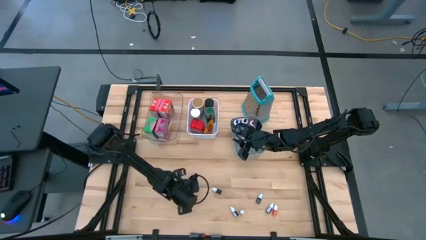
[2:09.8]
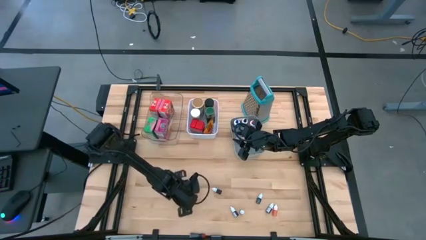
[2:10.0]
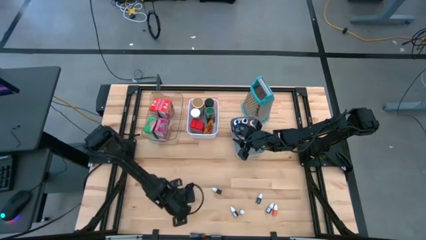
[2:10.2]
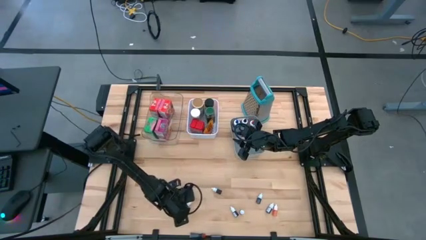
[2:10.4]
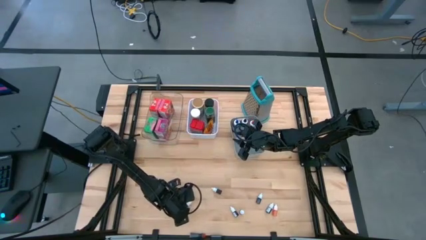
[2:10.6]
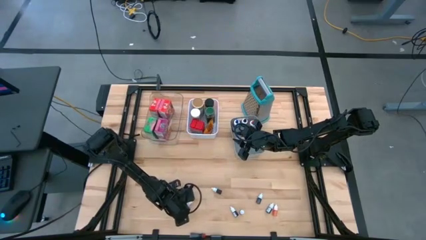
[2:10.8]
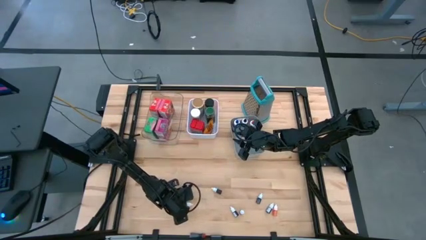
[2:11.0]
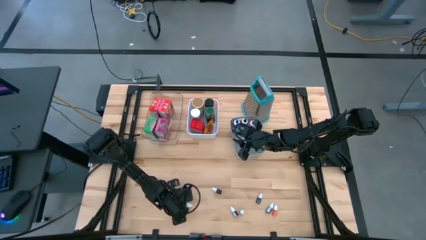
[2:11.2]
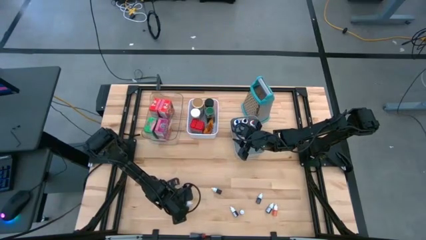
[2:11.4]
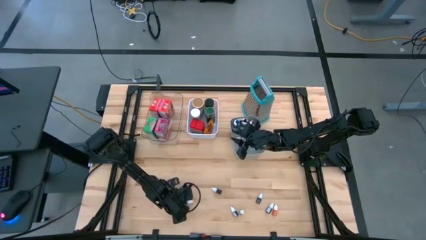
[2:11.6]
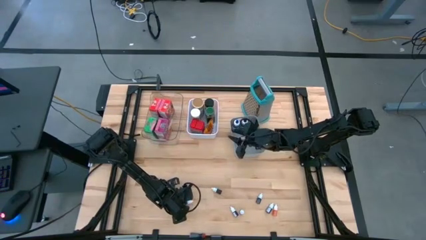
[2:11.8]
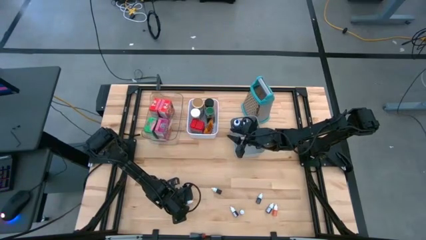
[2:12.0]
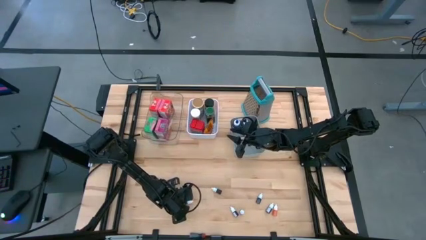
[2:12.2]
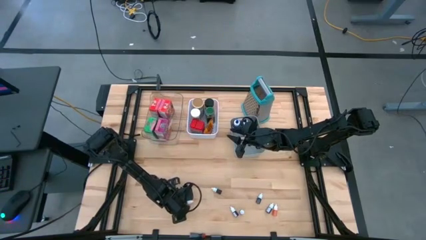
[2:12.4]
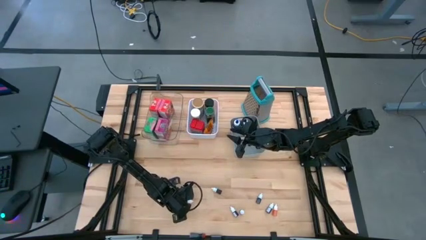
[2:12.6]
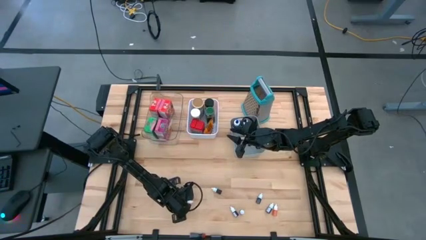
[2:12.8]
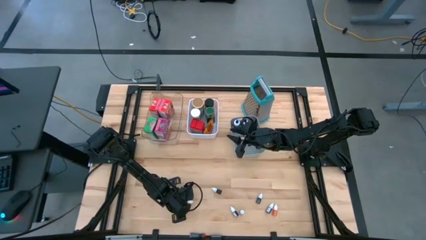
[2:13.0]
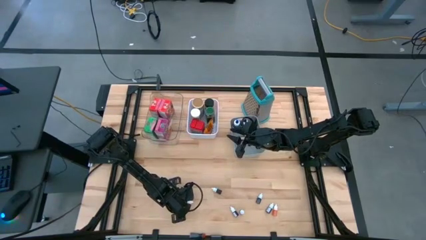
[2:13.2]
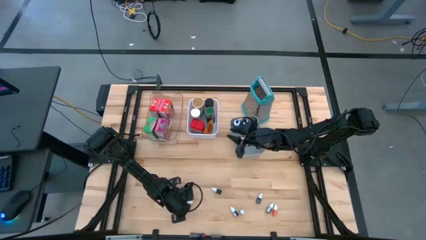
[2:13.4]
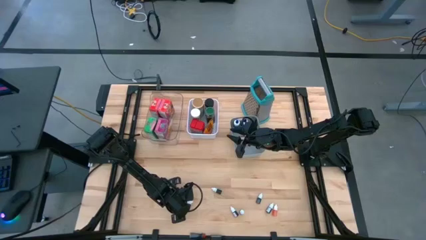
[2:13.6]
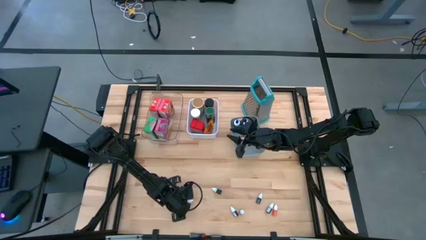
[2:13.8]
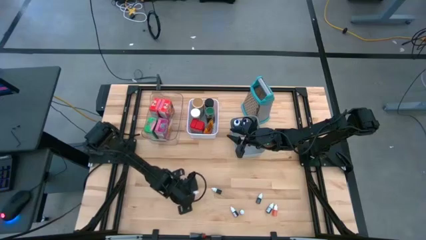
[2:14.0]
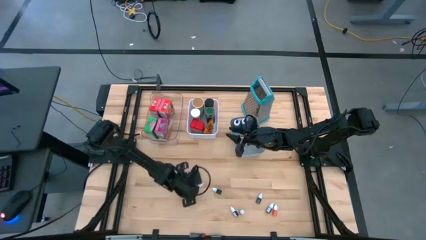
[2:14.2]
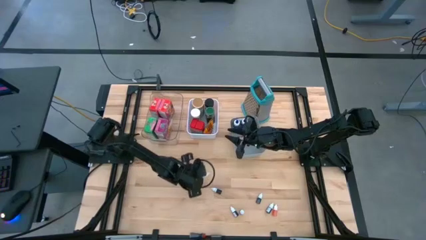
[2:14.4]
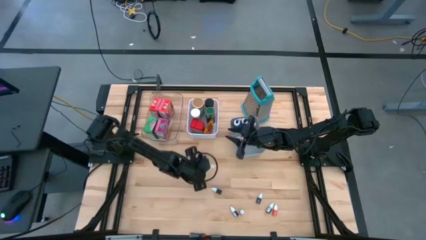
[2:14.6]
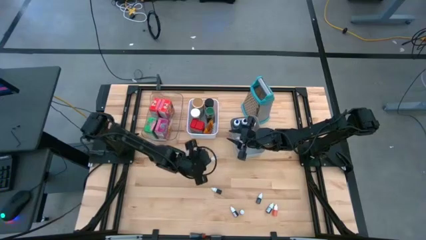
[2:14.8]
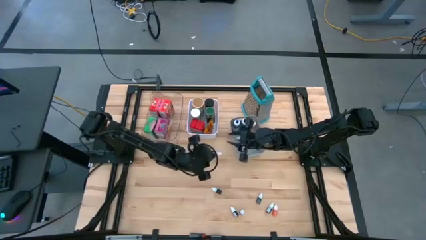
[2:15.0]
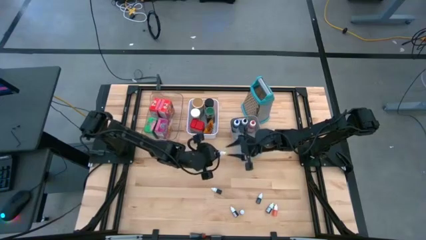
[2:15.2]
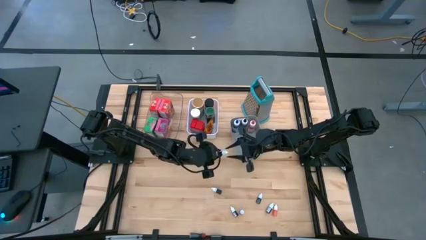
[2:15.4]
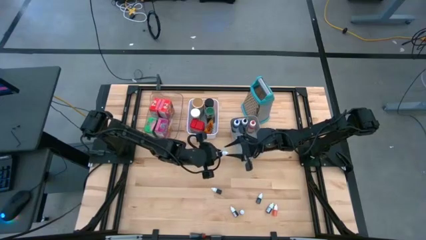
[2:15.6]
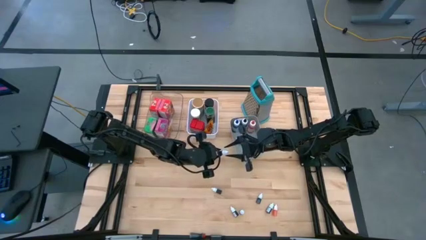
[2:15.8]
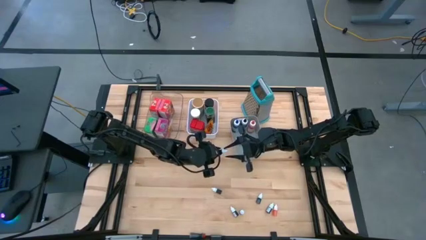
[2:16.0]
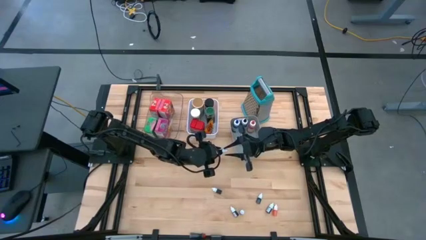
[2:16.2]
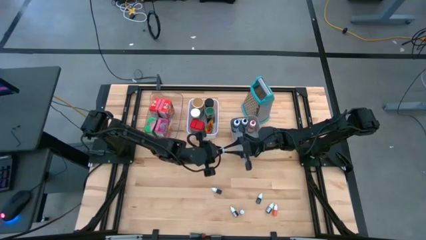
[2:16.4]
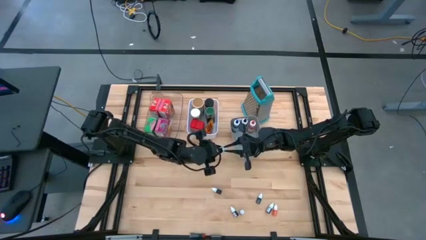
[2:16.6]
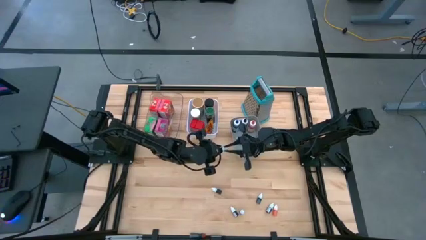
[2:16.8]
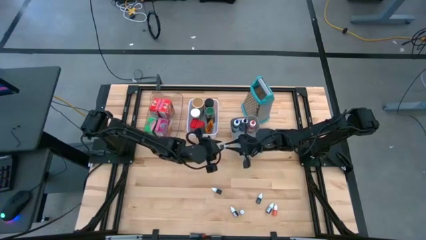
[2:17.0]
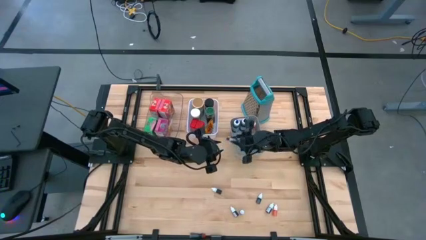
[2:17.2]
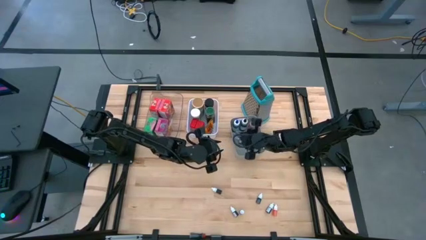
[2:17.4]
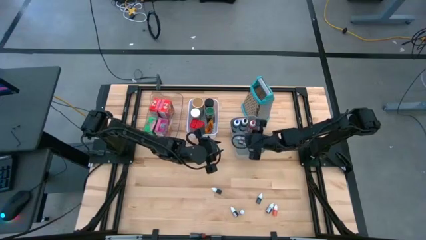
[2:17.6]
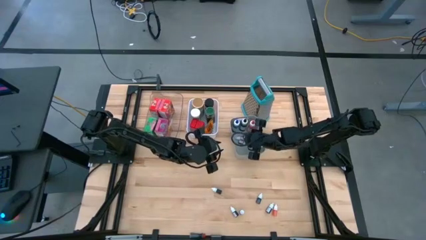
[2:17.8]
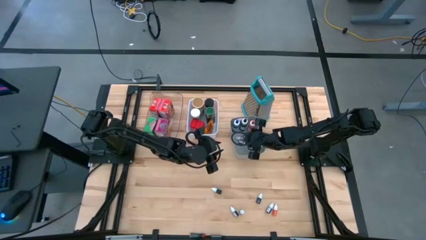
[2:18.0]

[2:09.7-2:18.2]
Task: Pick & Place Kitchen Items
Put the small blue food coloring into the gray bin

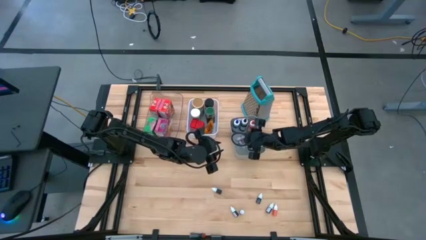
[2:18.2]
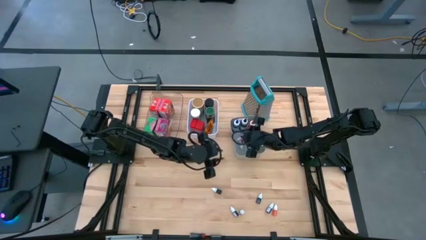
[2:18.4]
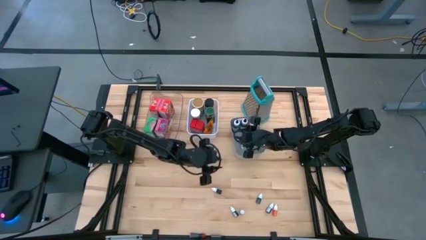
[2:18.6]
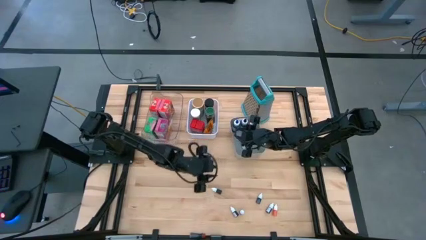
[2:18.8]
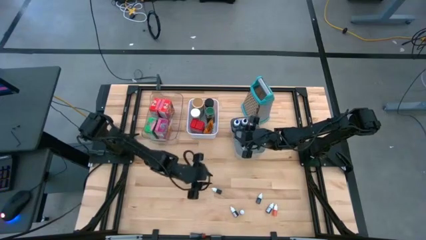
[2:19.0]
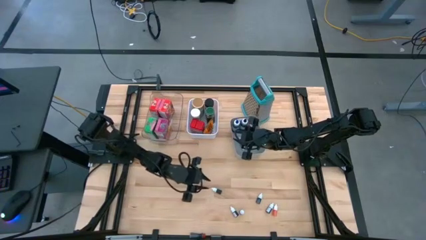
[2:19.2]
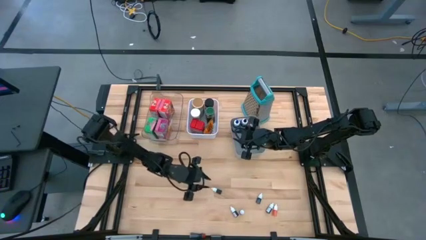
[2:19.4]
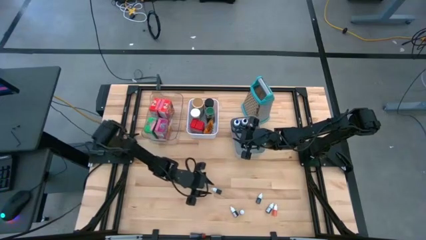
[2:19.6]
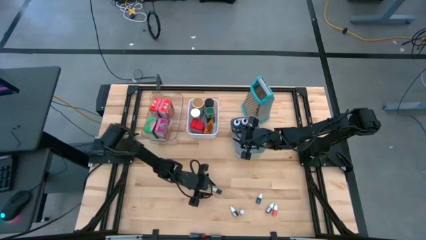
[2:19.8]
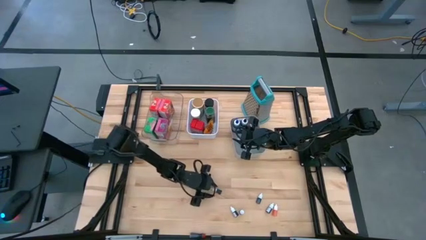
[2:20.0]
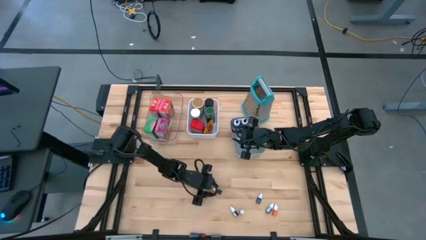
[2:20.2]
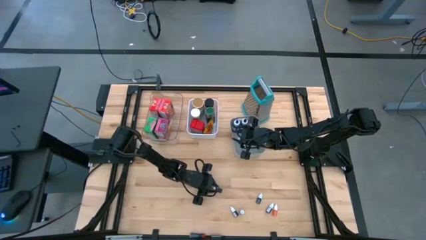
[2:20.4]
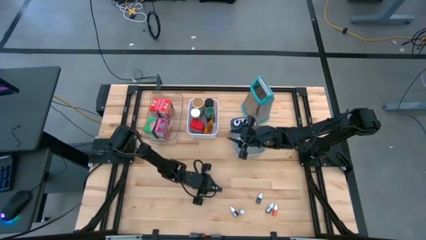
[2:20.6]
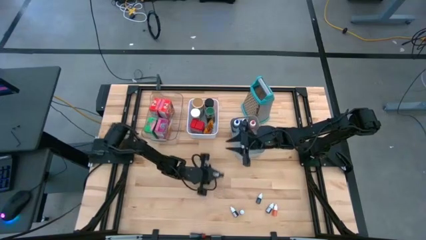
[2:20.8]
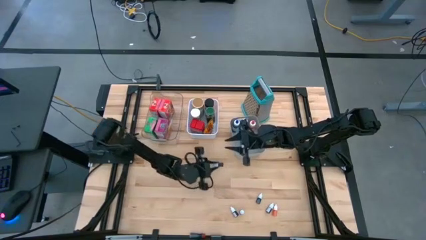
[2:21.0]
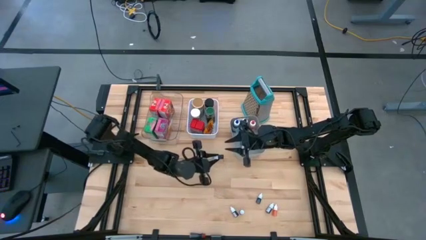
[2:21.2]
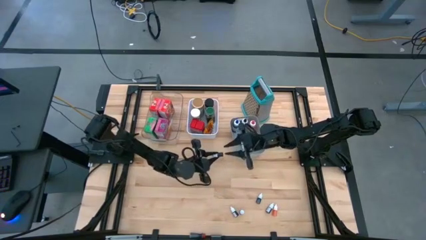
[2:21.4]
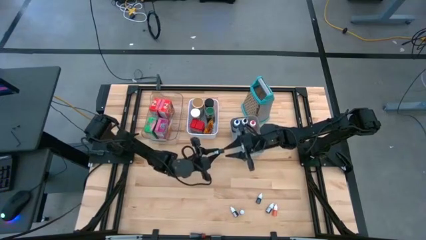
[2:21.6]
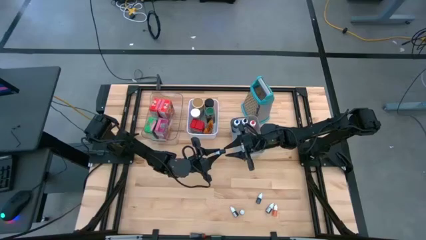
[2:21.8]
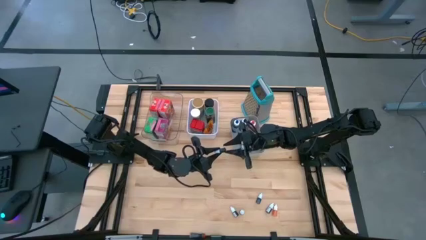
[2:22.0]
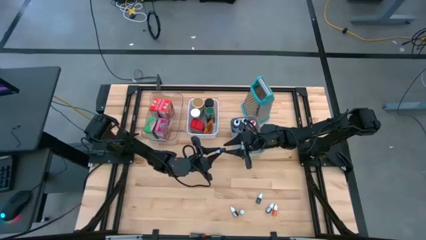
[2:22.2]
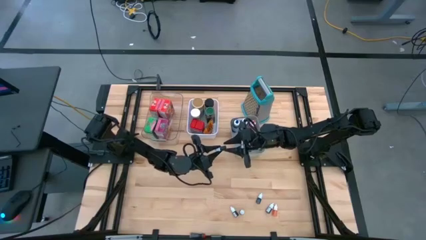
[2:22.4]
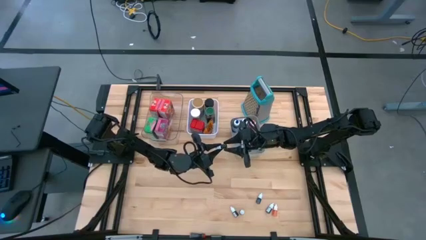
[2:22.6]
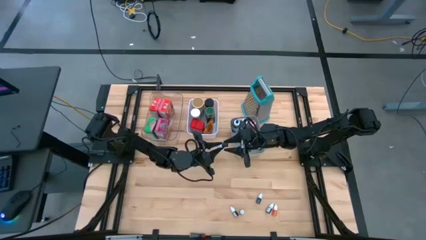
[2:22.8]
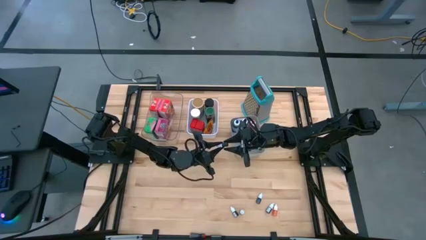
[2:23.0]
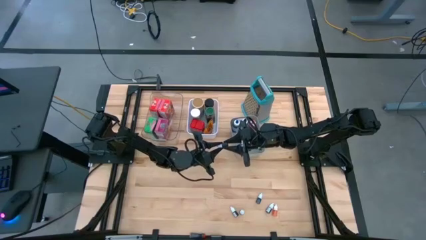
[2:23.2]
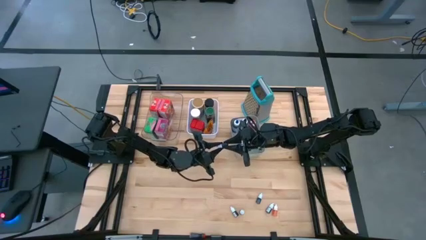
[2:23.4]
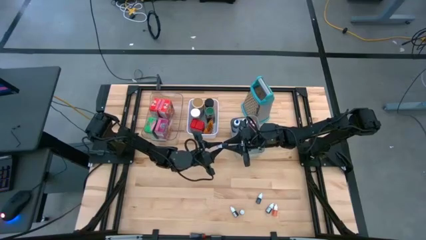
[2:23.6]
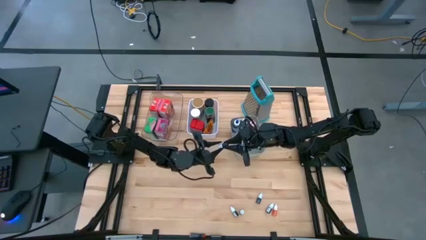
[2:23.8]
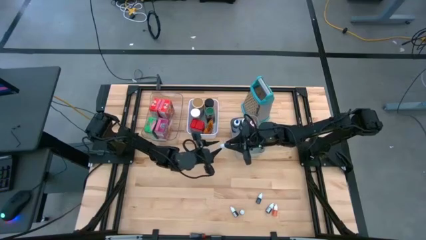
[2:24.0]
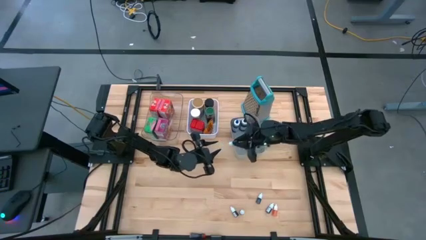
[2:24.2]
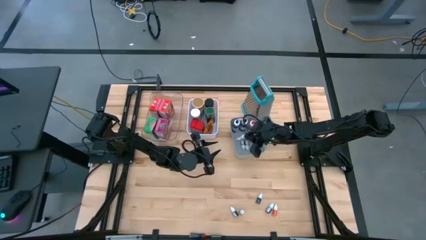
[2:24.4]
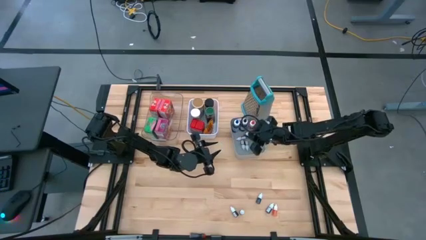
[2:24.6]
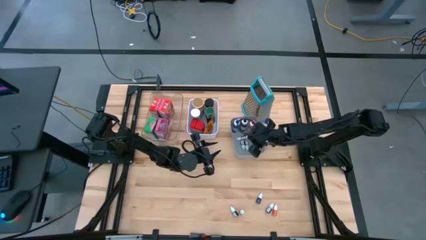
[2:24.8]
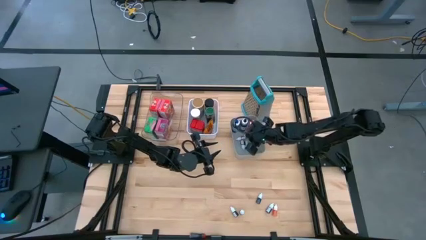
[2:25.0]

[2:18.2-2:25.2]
Put the small green food coloring into the gray bin
